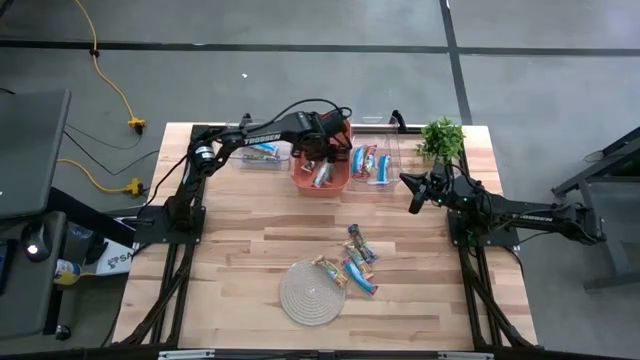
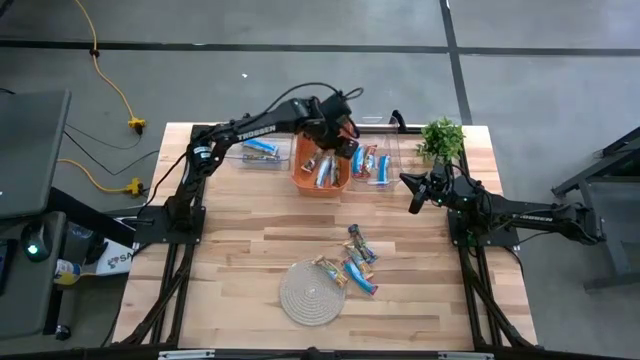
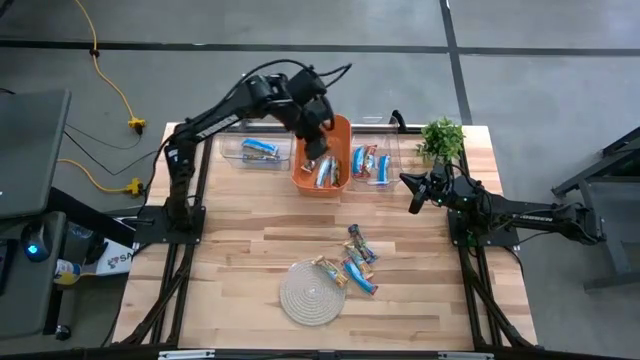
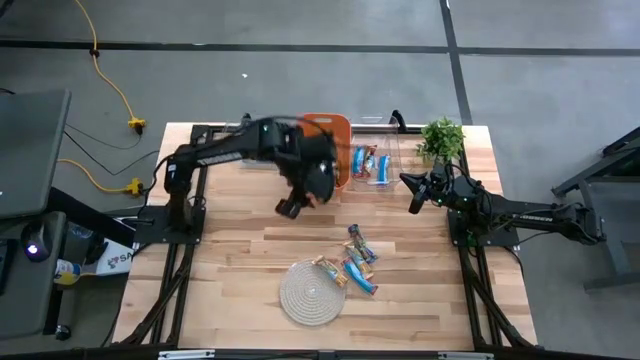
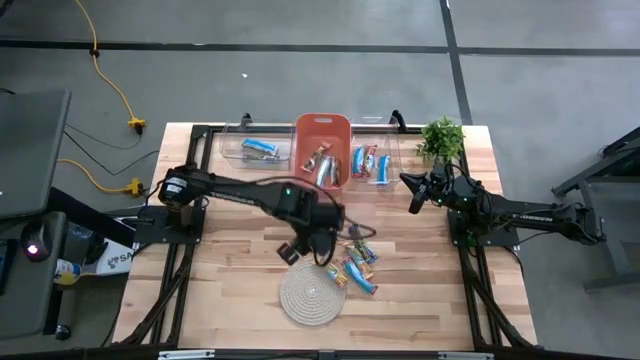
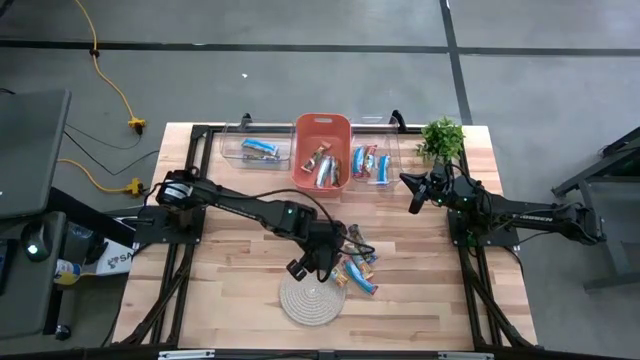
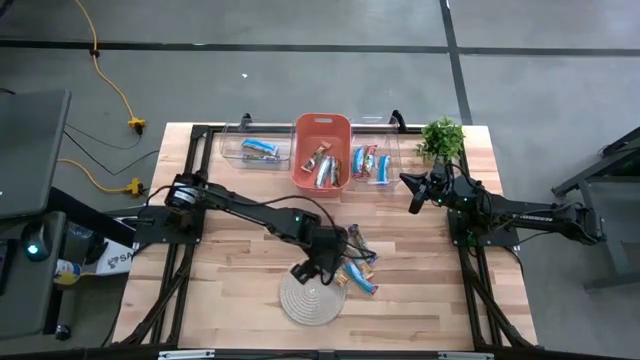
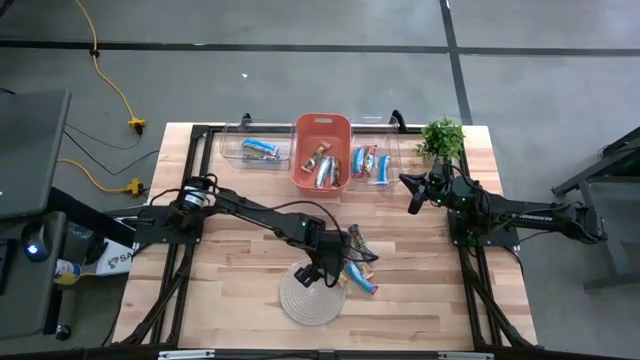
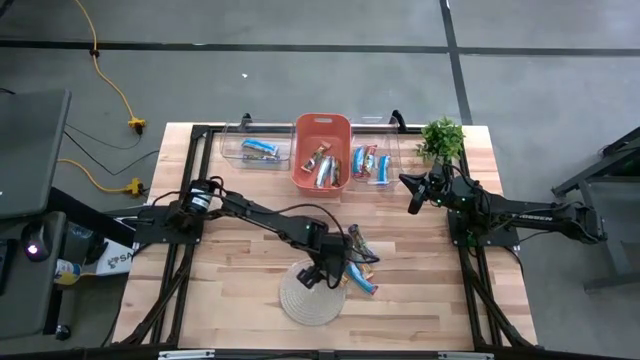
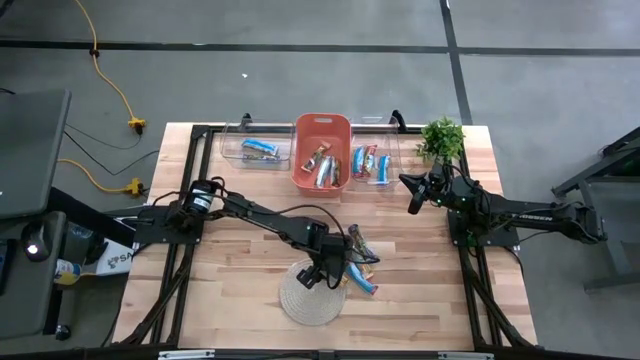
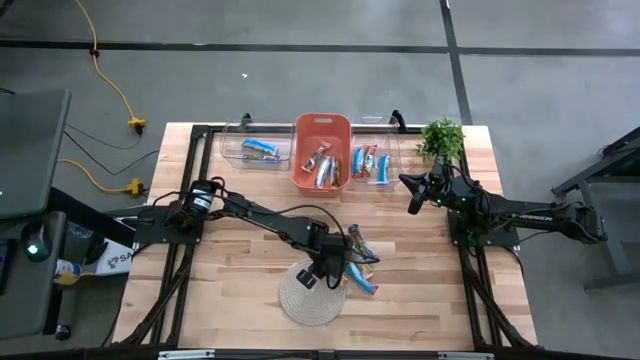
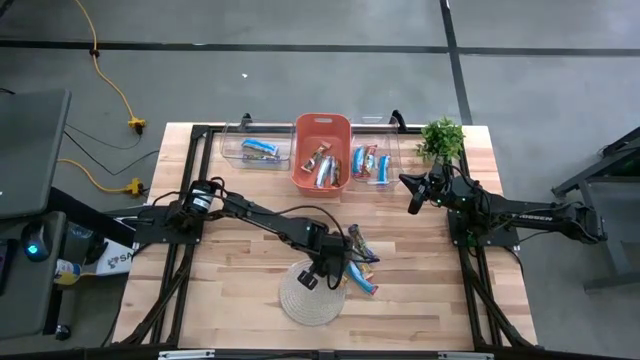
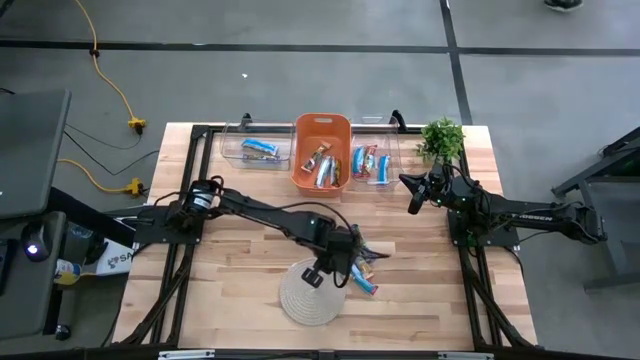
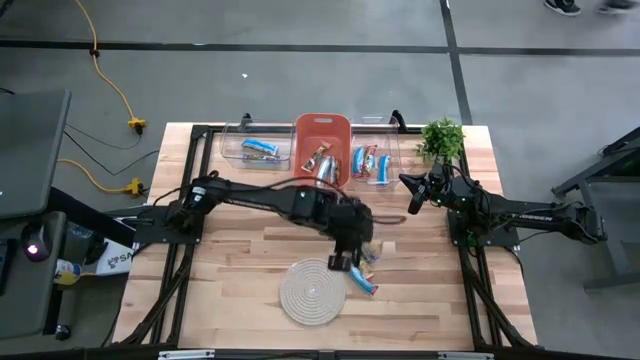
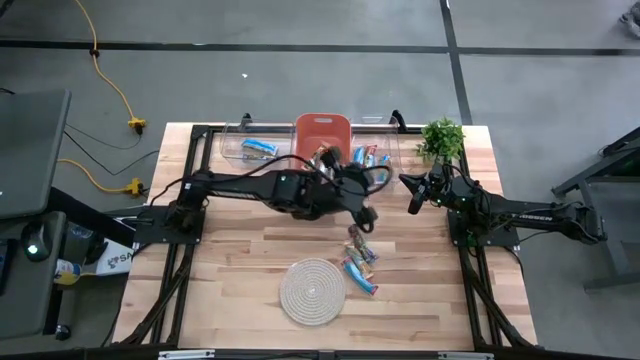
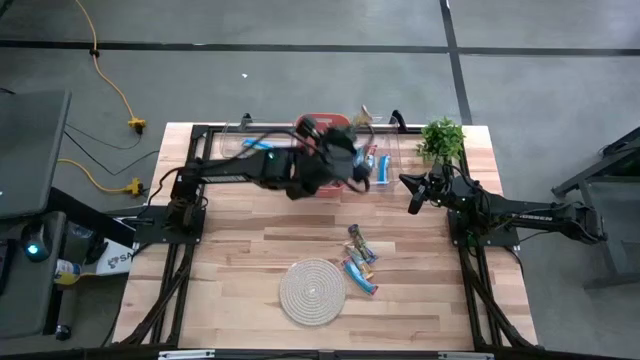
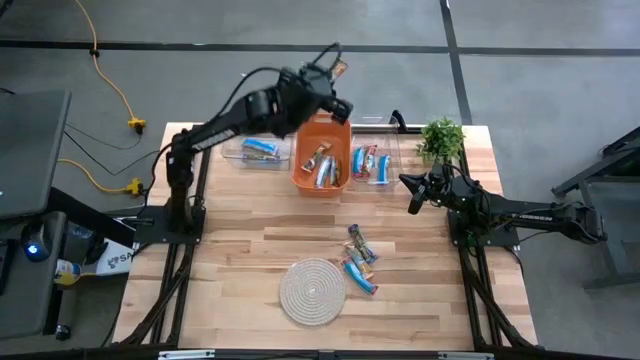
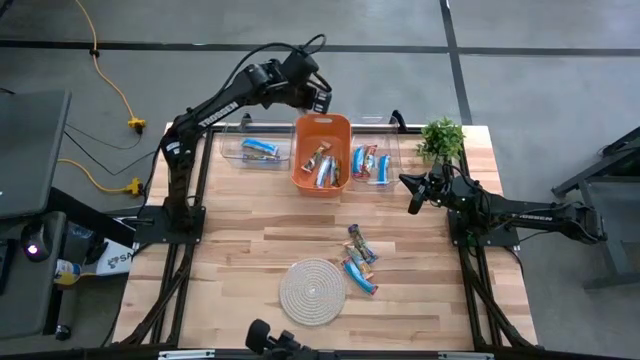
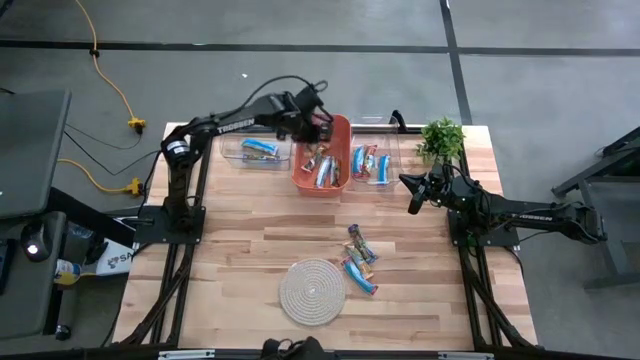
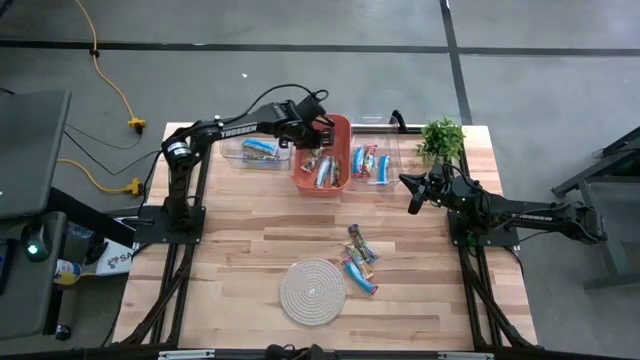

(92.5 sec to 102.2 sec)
Task: Pick and place Granola Bars by type
Put the yellow granola bar into the orange bin

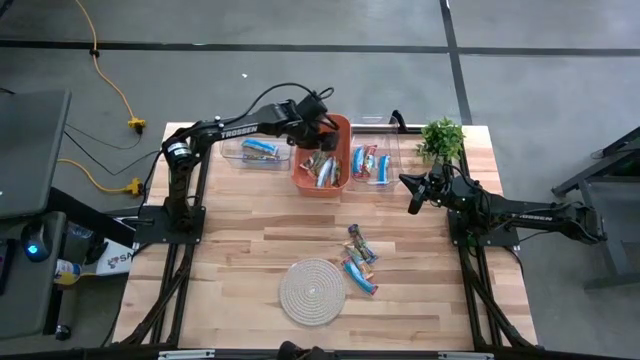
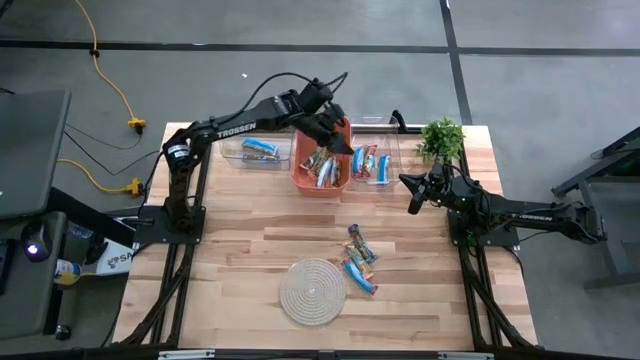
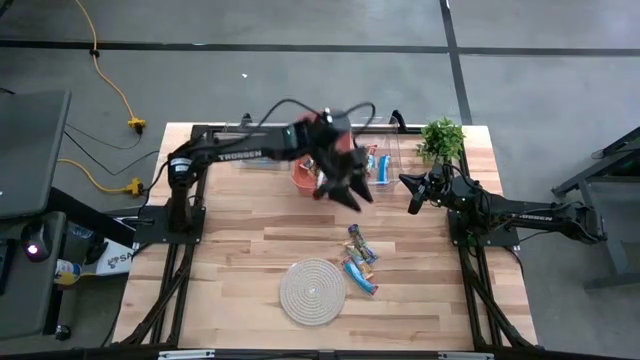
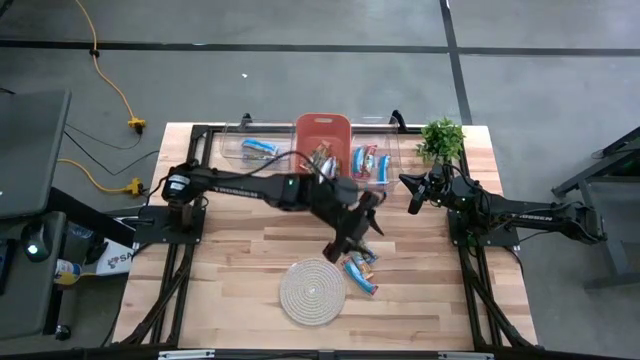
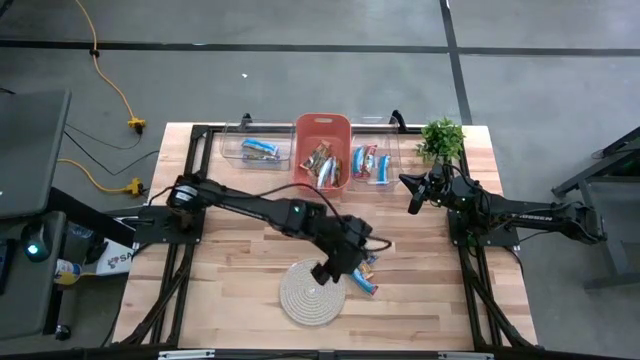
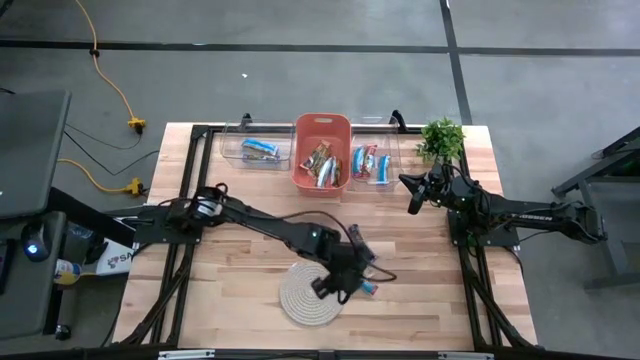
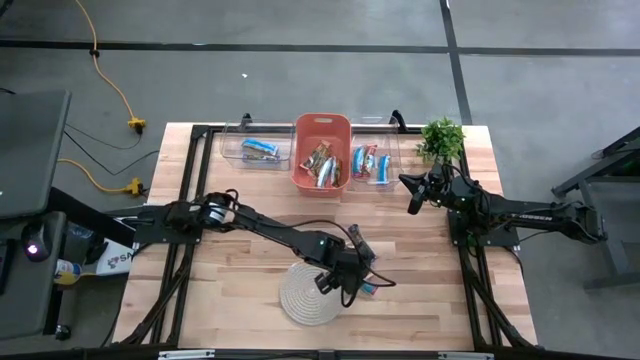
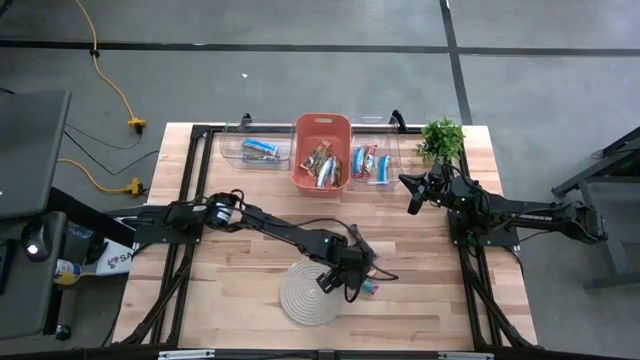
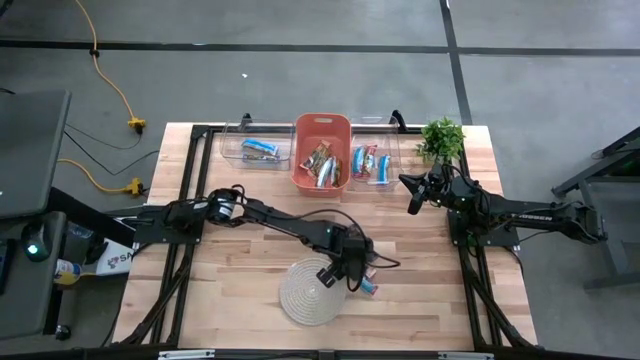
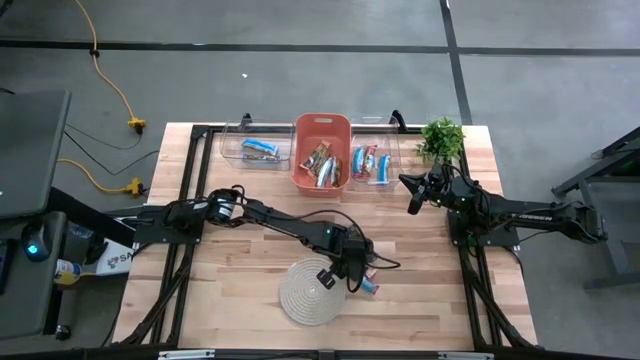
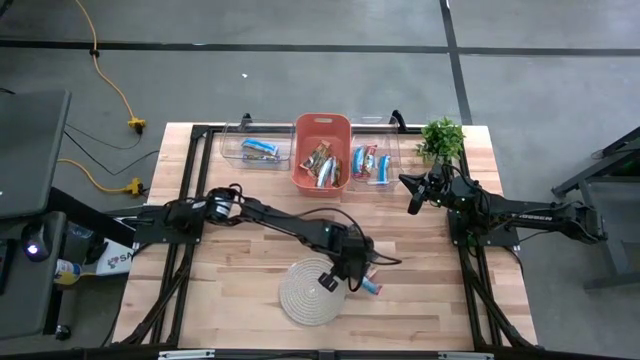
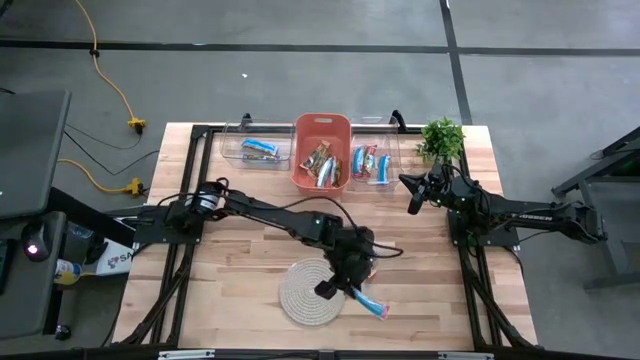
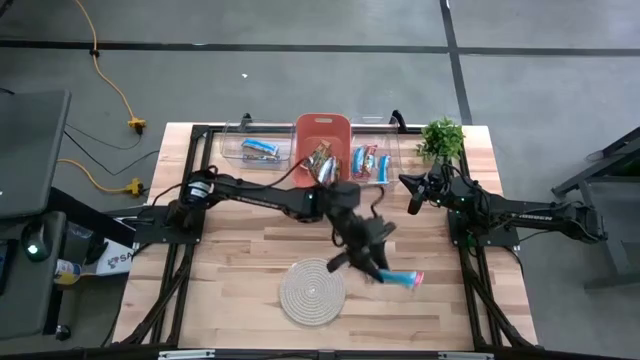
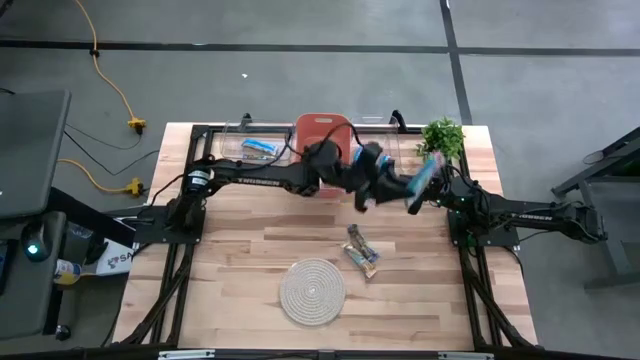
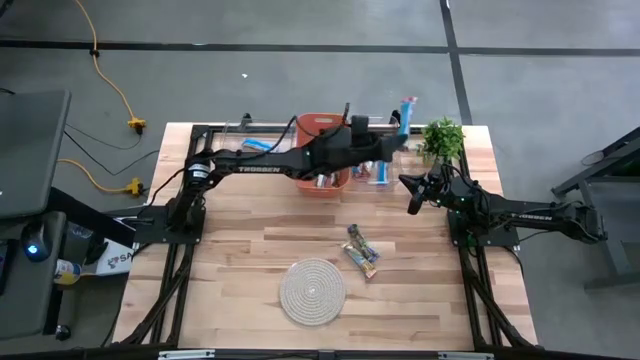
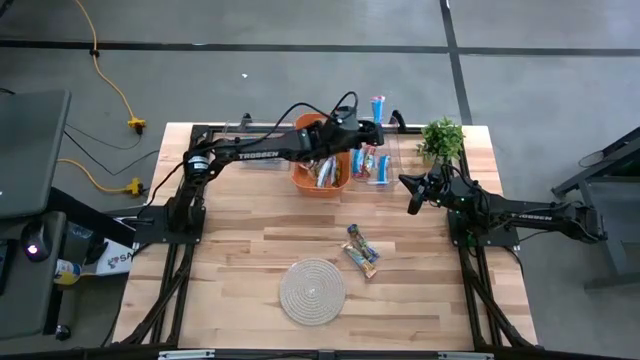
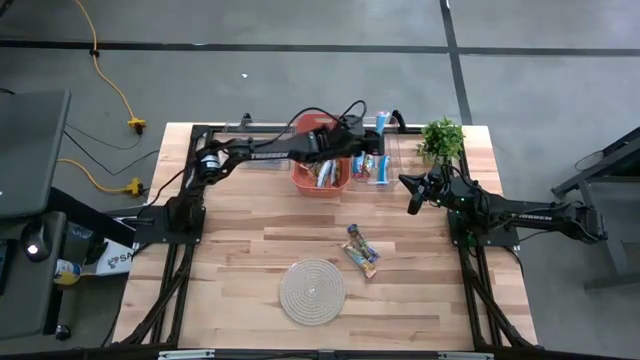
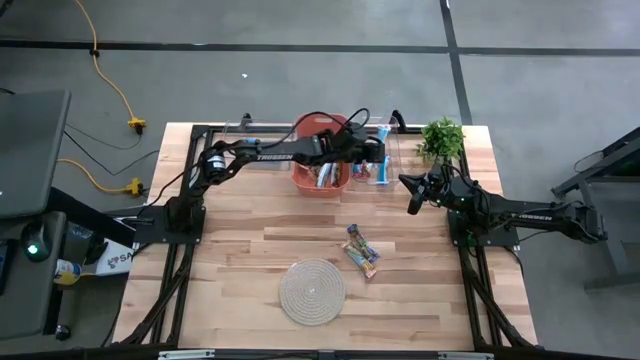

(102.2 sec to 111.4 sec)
Put the red granola bar into the right transparent bin

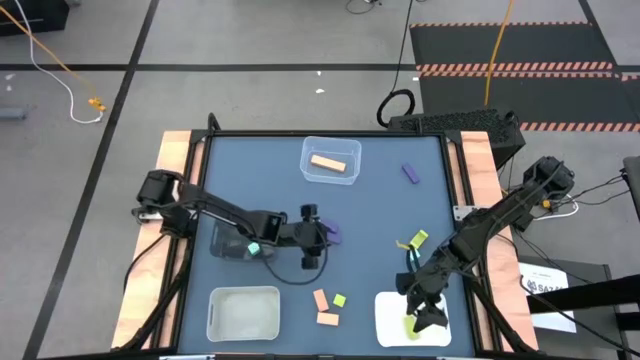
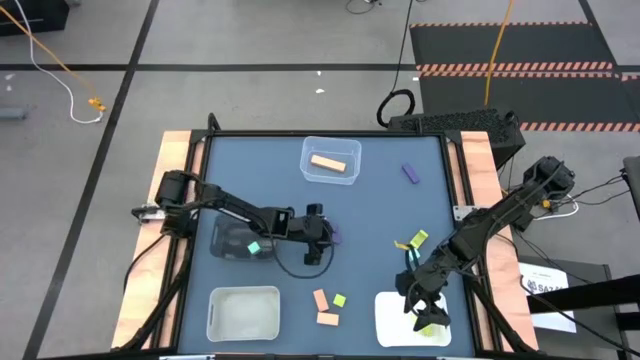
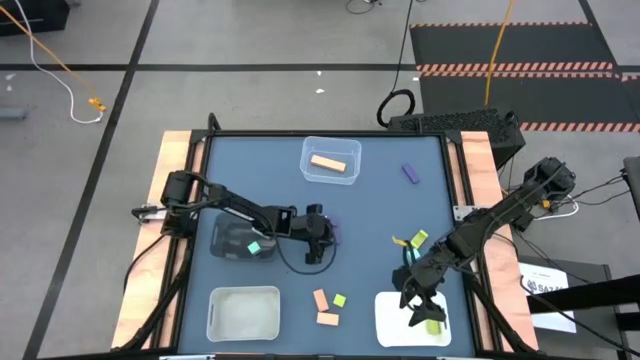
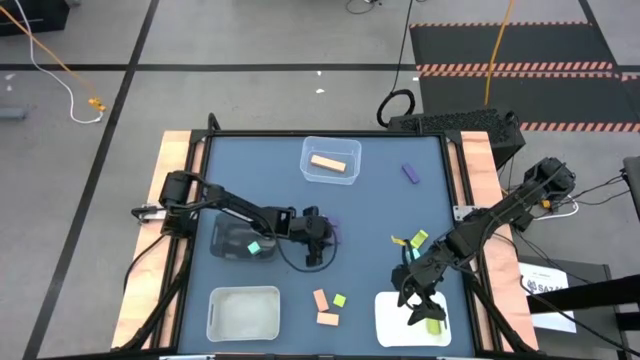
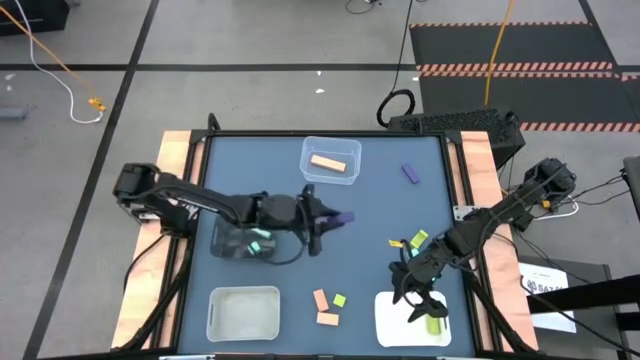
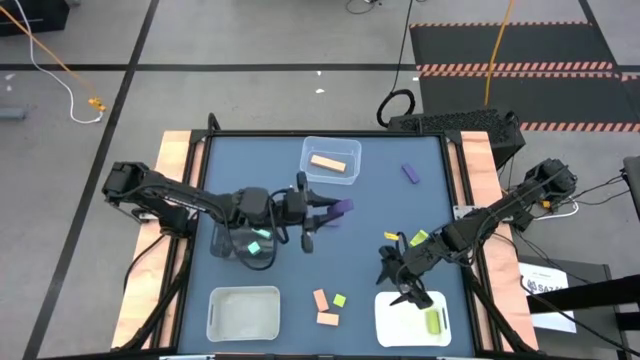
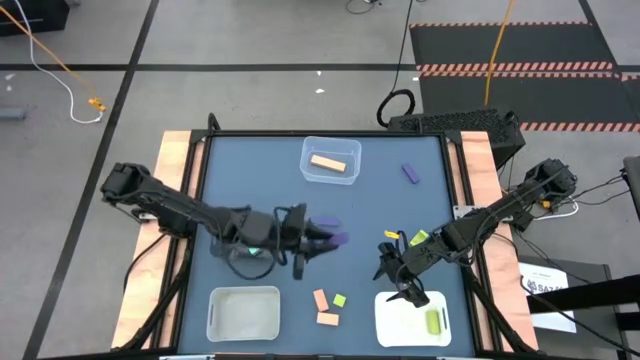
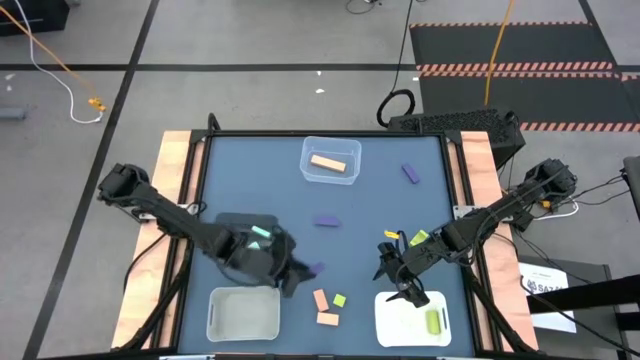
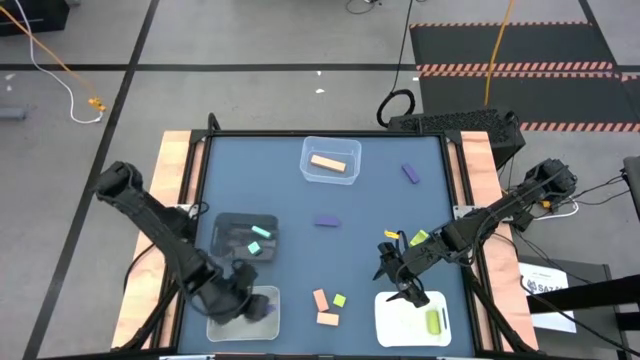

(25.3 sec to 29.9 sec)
Task: Sort & place blocks by color
Put the bottom left violet blocks into the gray bin
